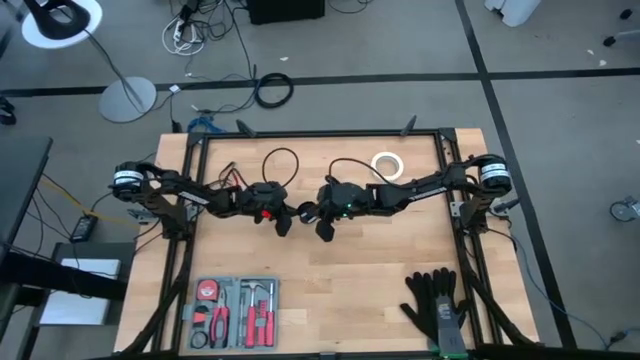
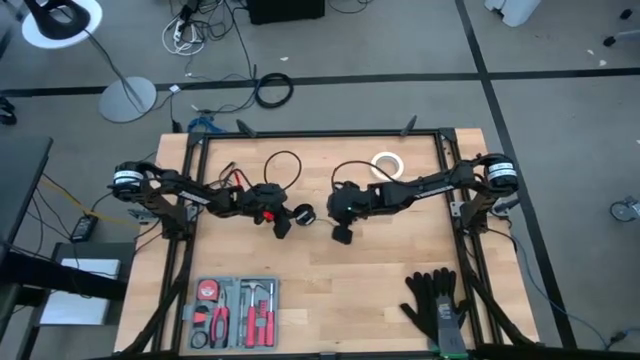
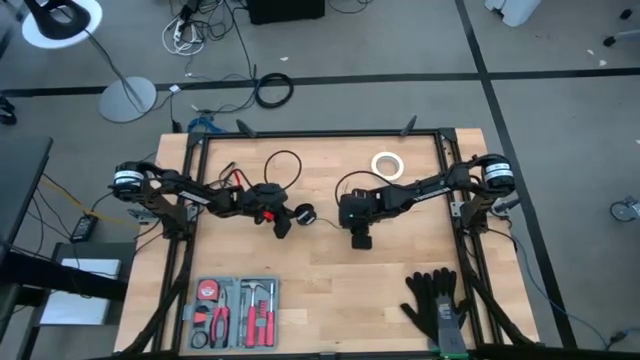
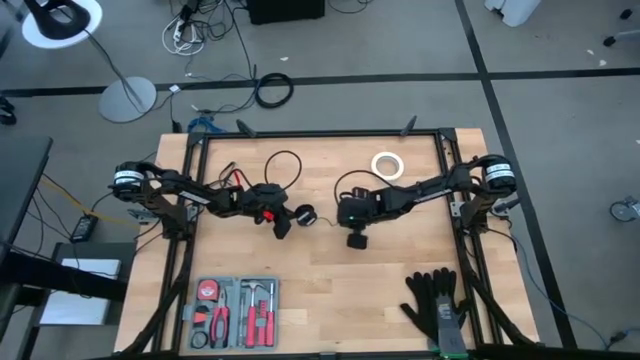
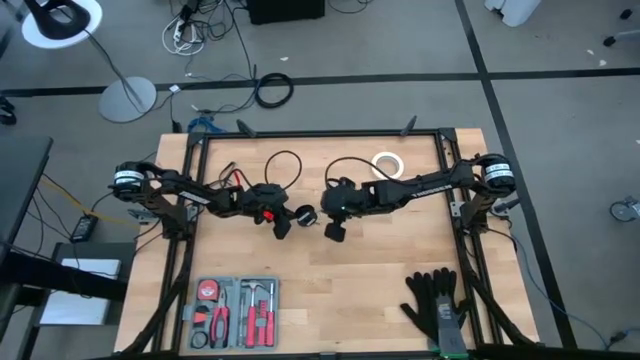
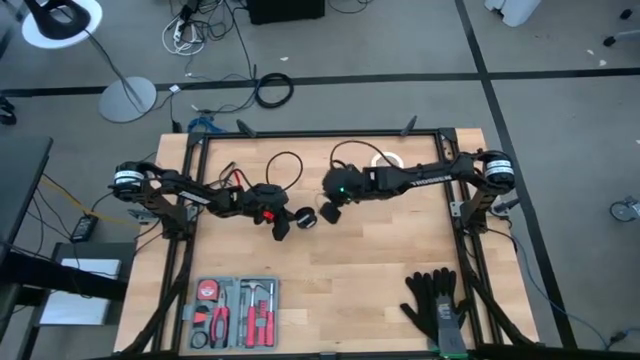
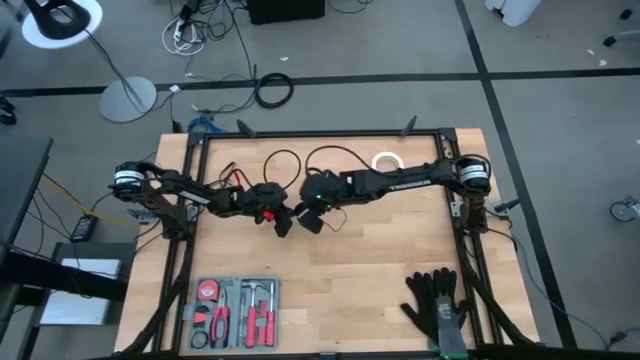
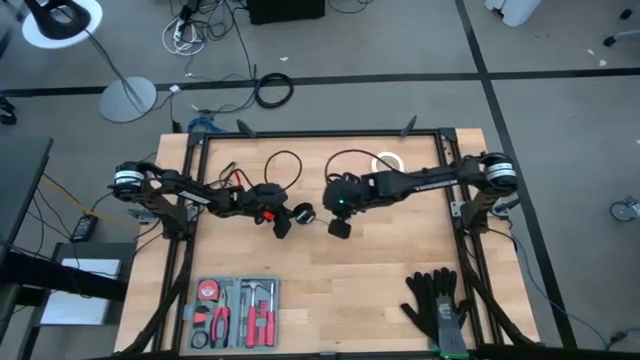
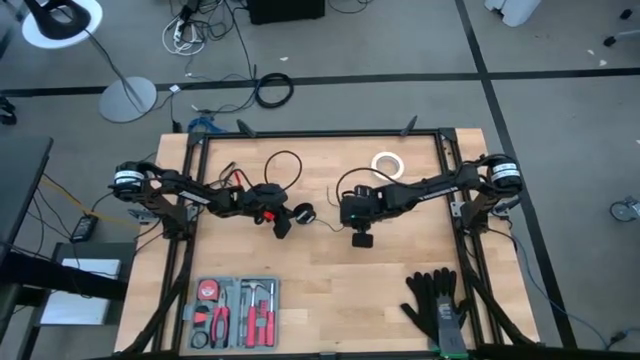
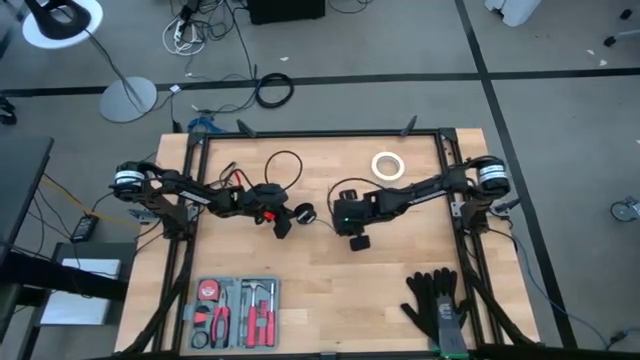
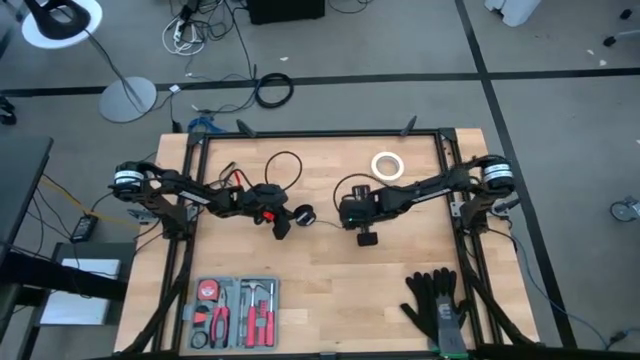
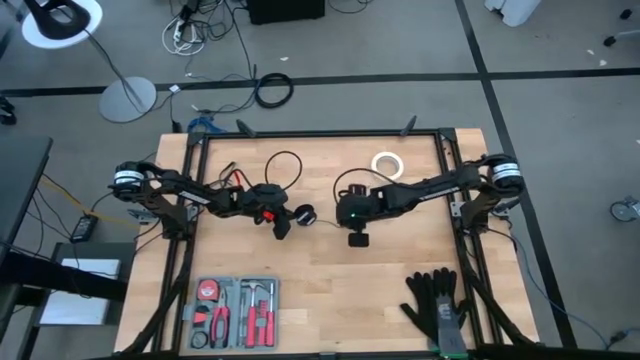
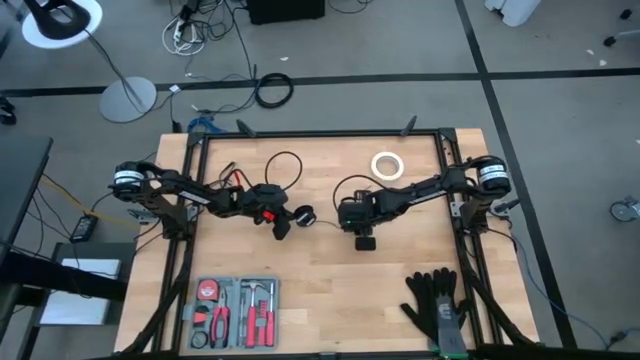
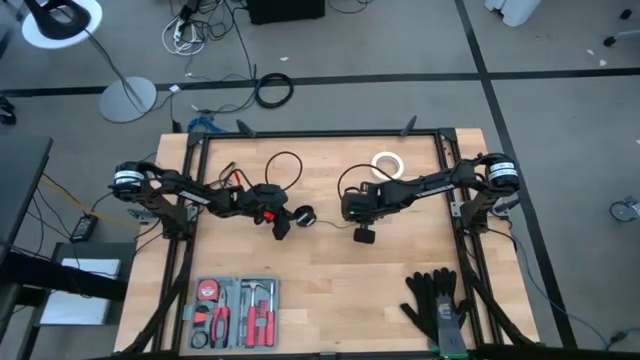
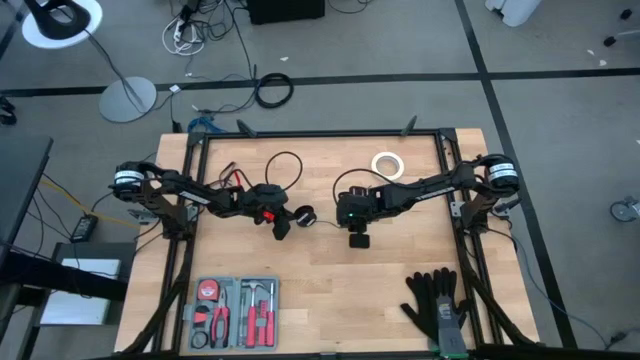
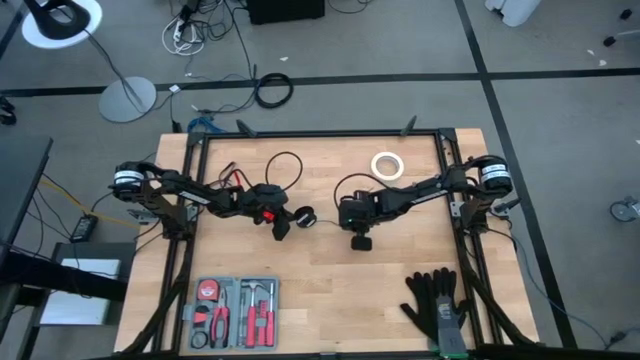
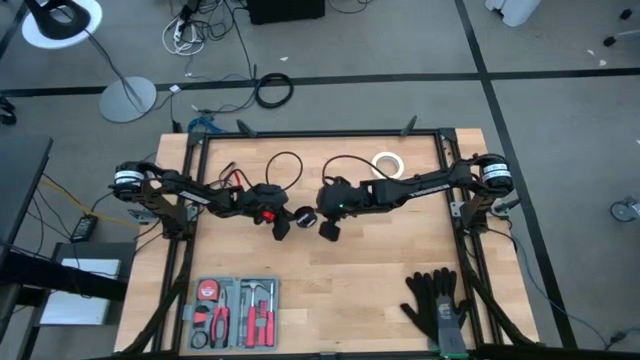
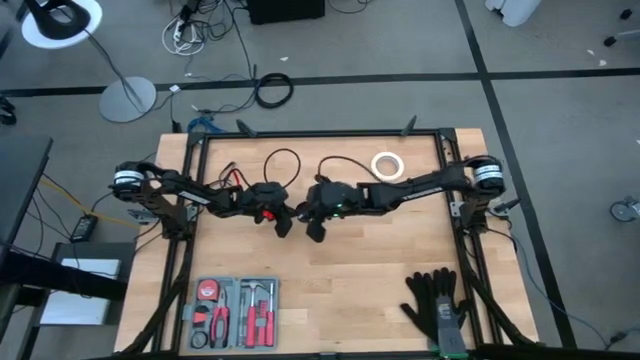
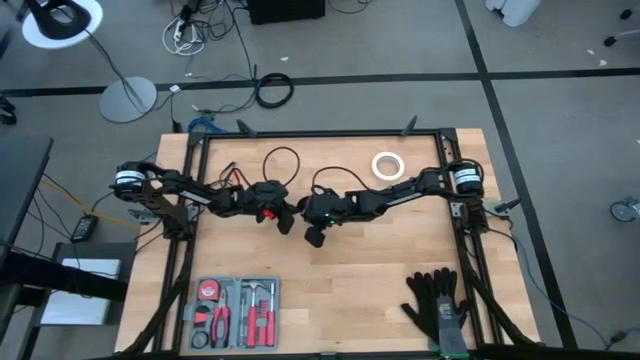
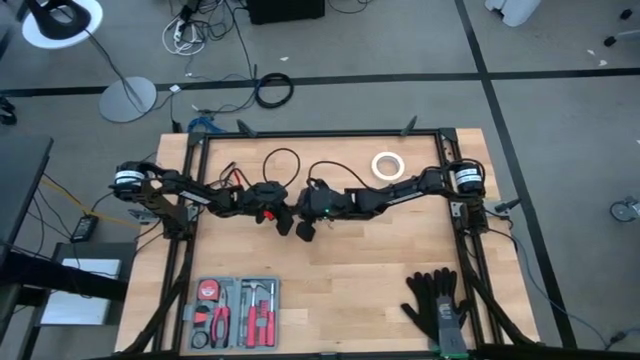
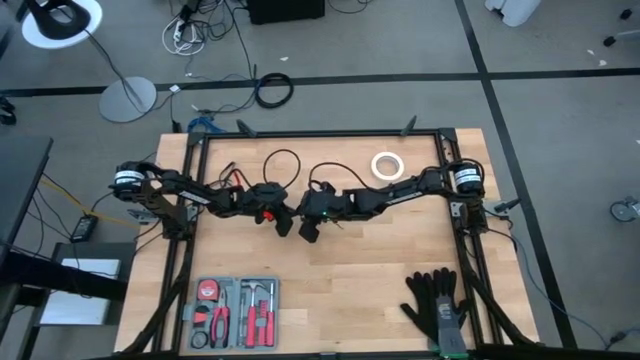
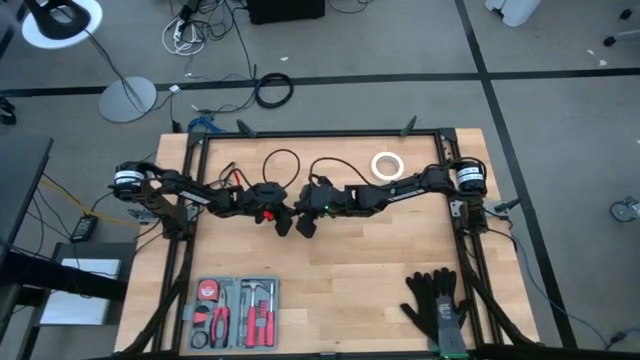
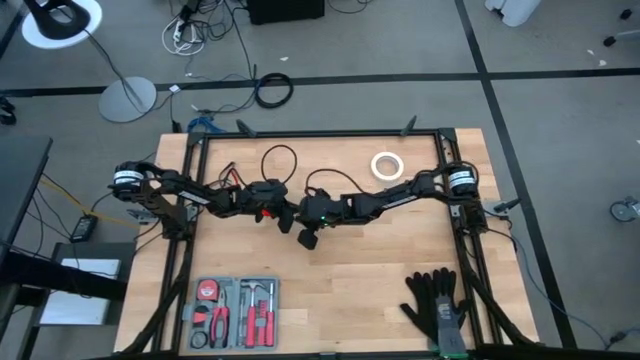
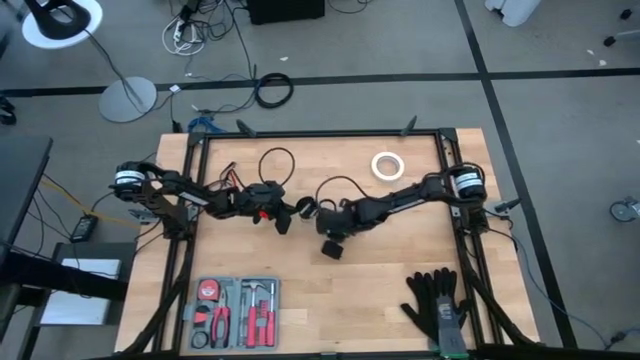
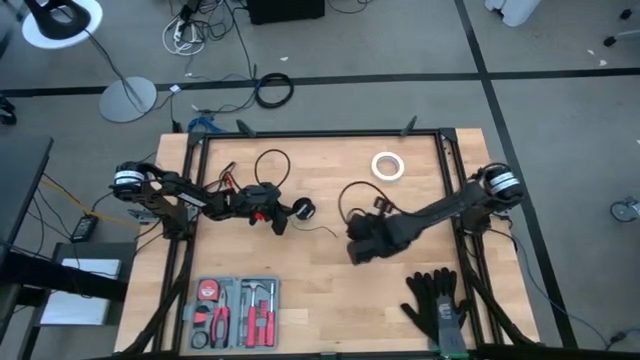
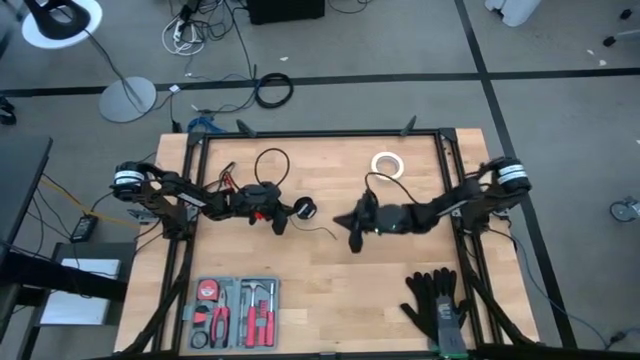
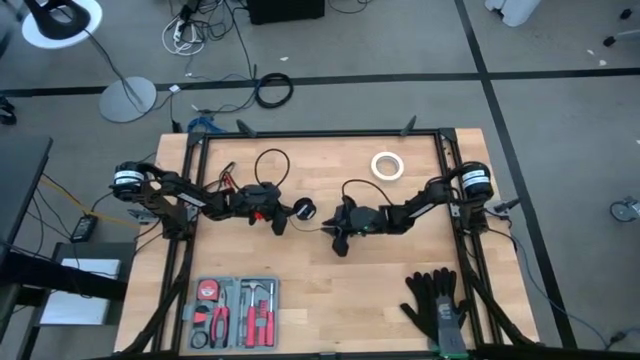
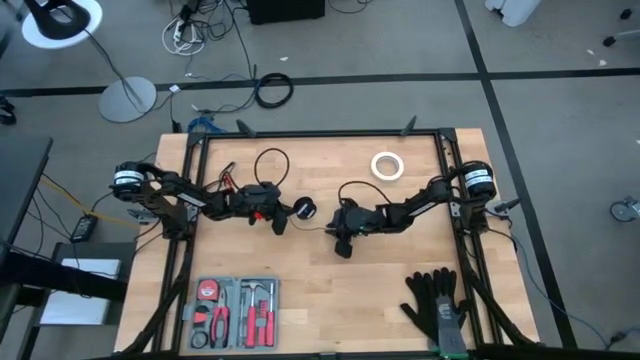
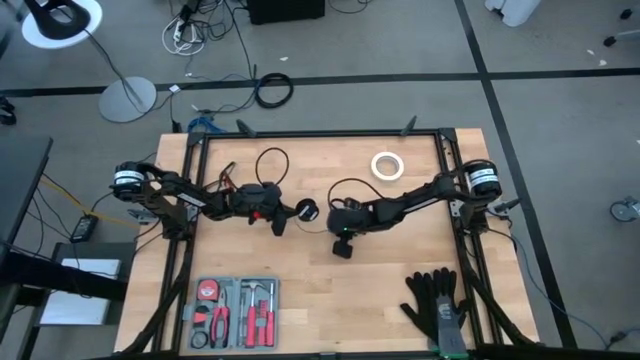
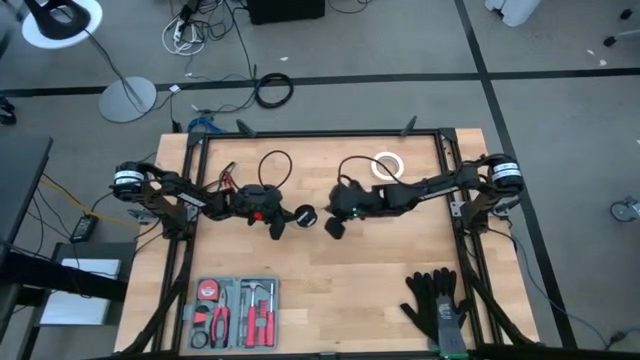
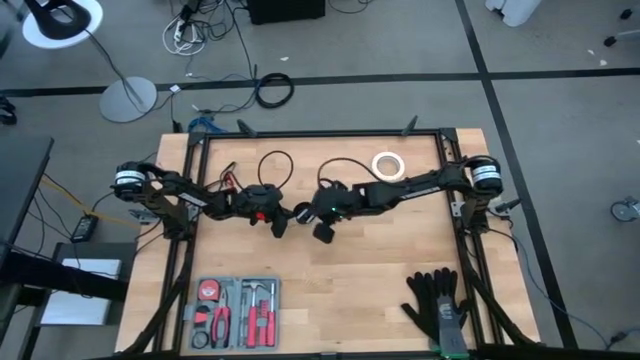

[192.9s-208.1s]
Task: Coil cords
Coil the black wire on the black spool

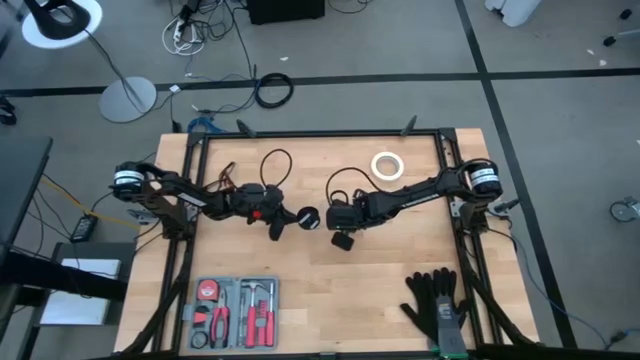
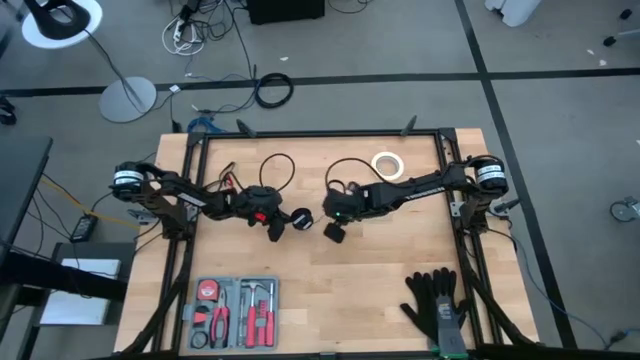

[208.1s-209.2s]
Coil the black wire on the black spool

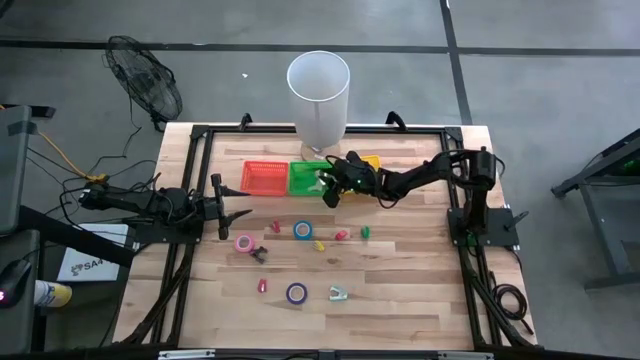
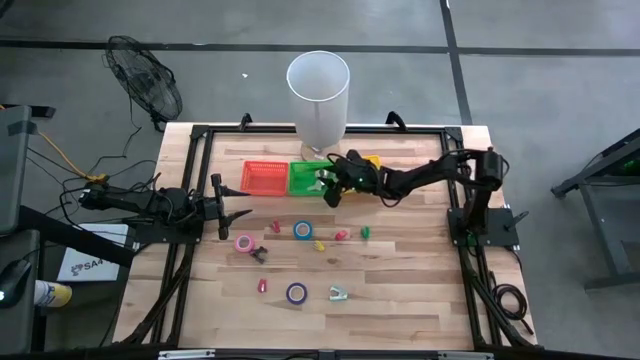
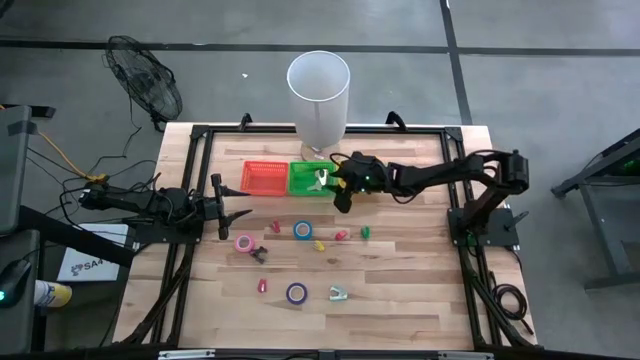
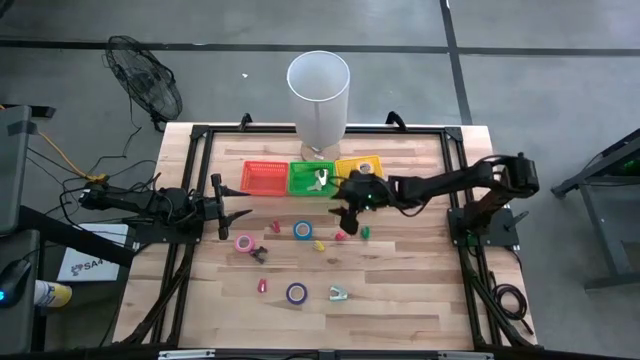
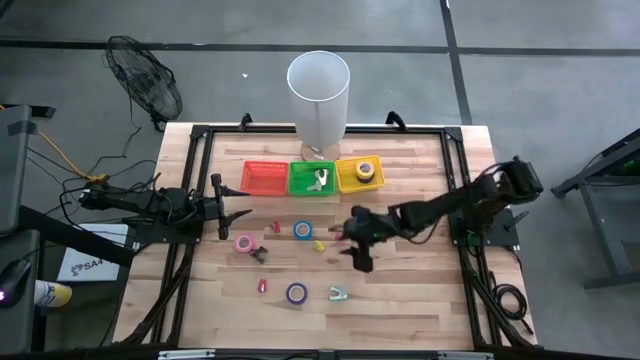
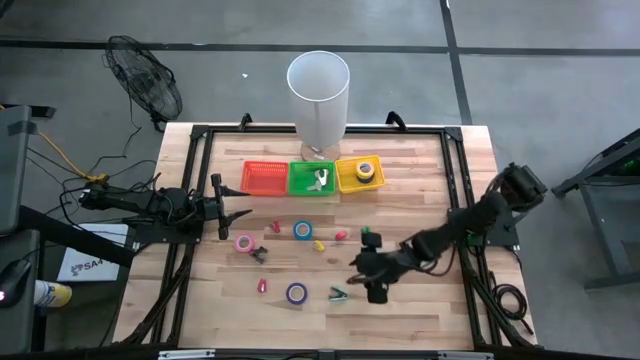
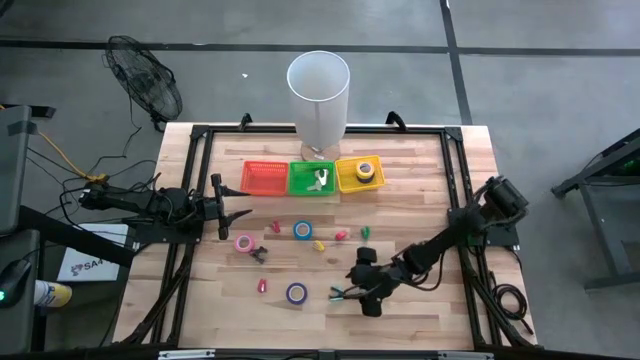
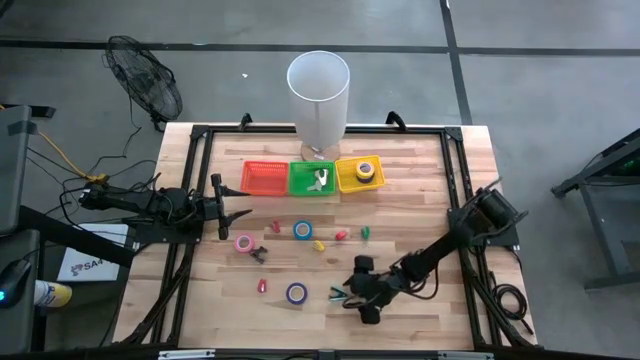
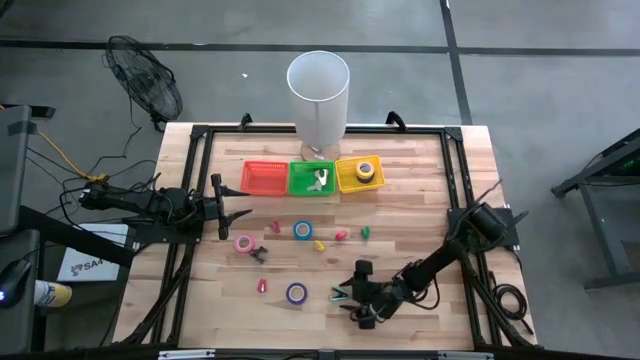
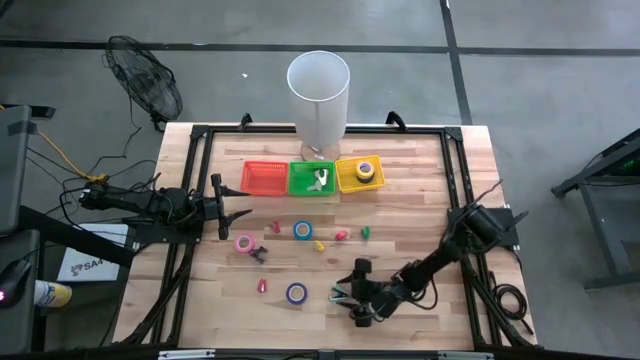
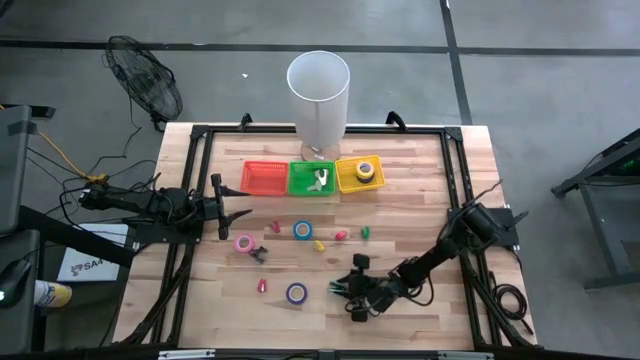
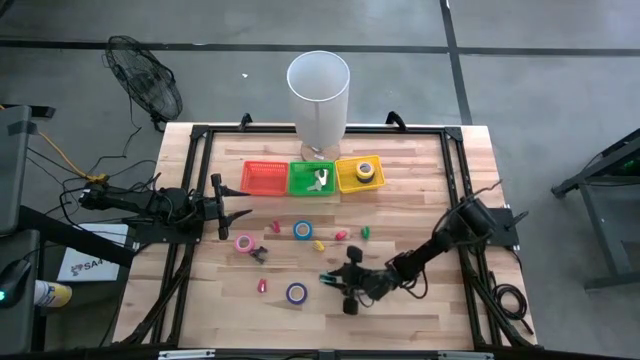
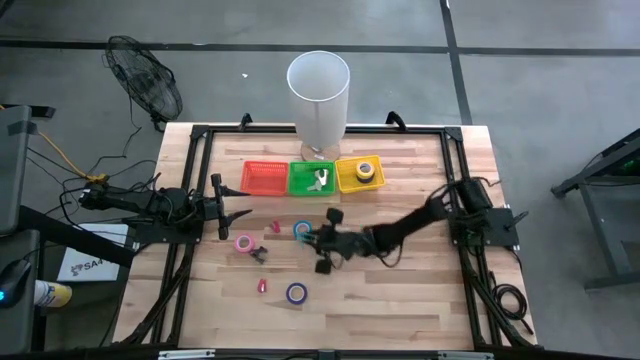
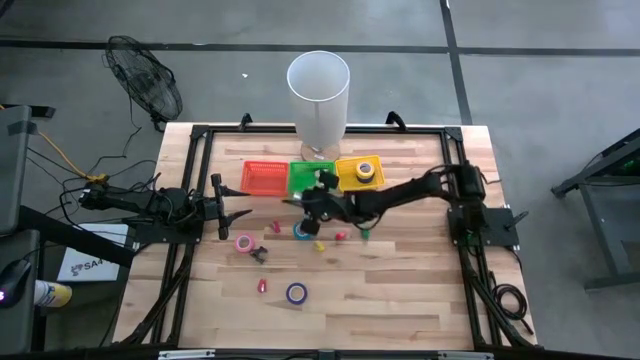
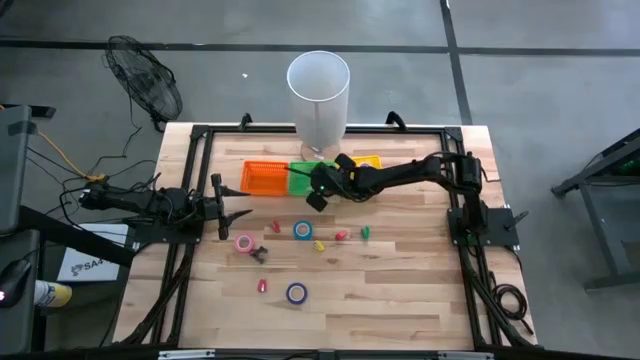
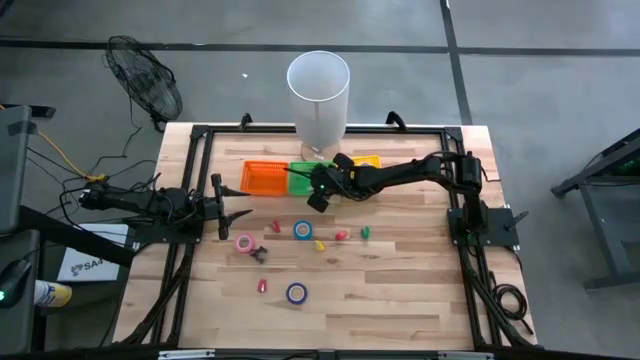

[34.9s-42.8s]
Task: Pick and place Stapler, Stapler remover, tape
Put the light blue staple remover into the green bin
